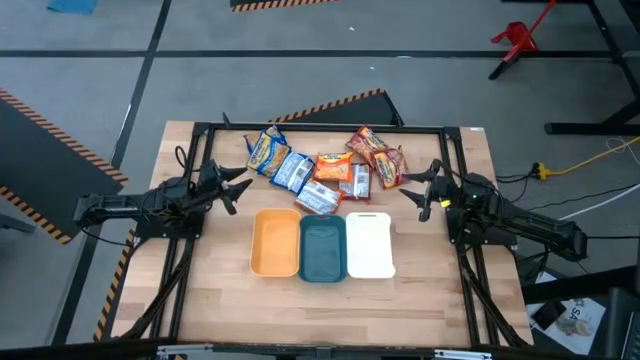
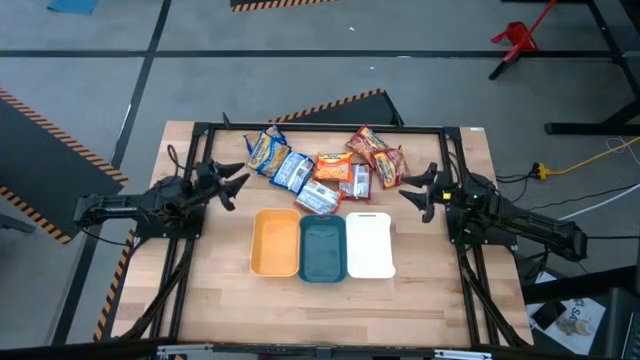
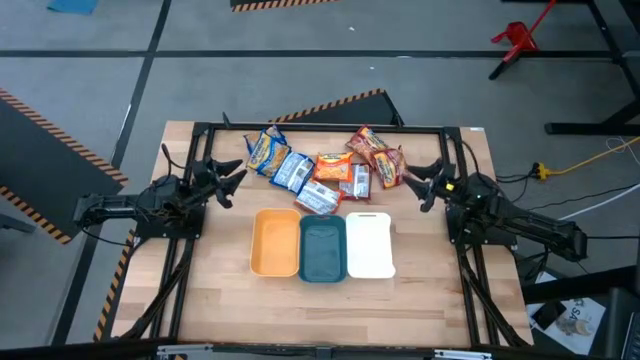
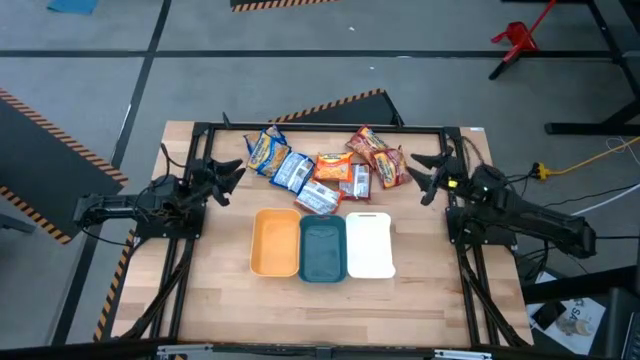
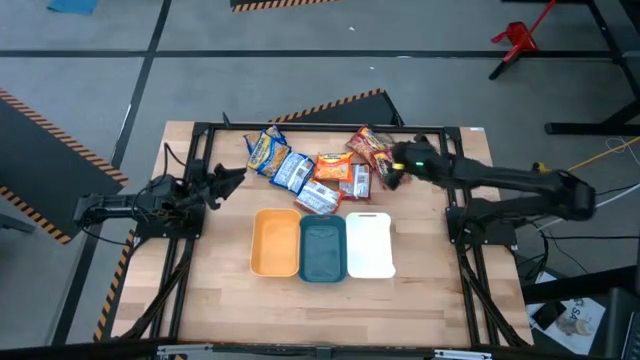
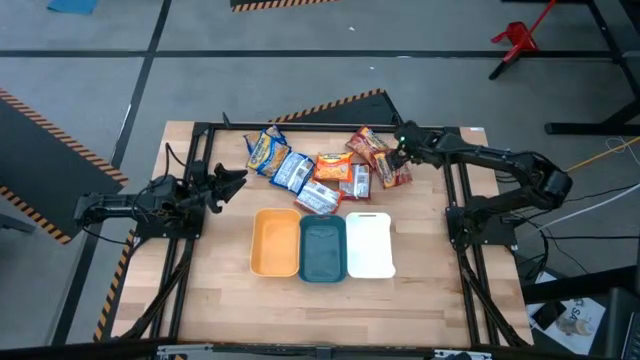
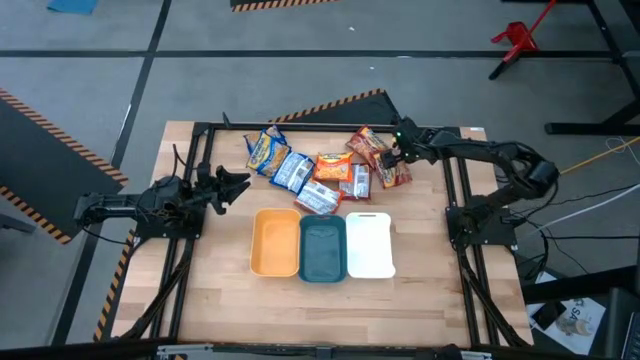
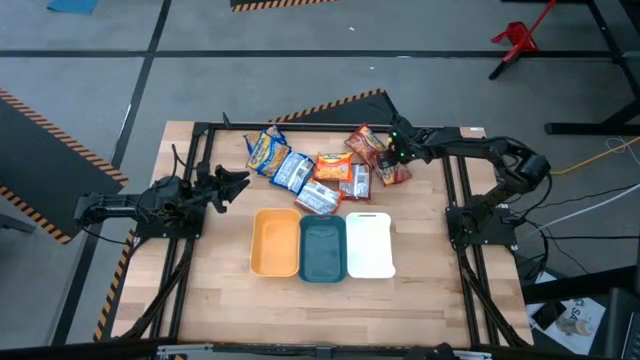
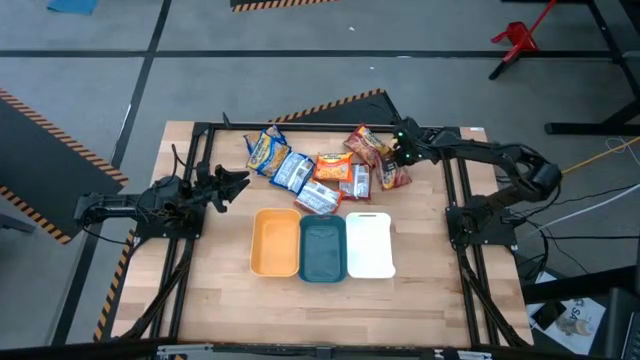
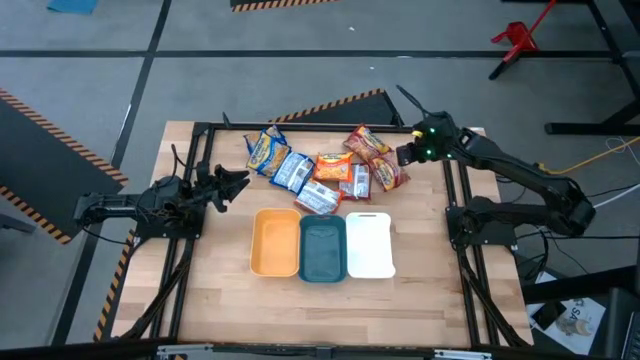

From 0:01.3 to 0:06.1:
Task: Sort Maruchan noodles
Put the center red noodle pack into the white bin

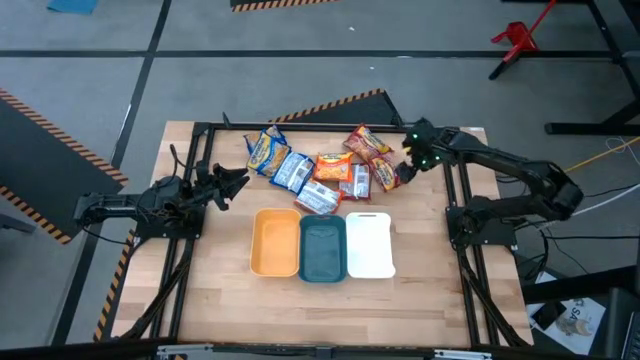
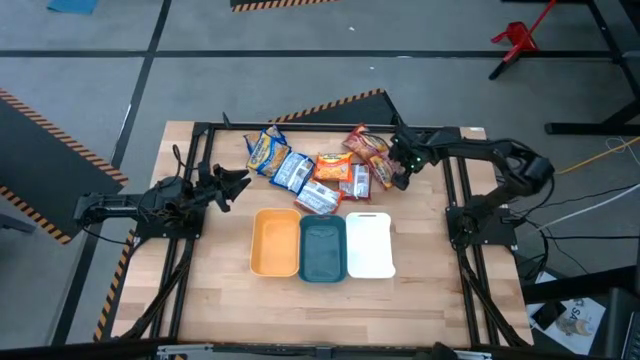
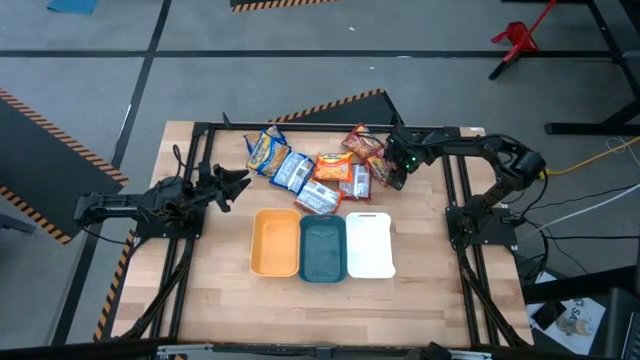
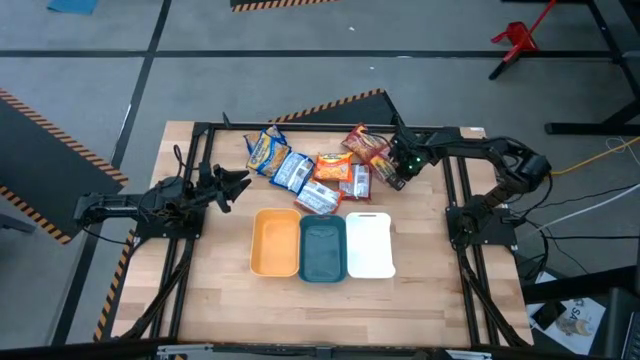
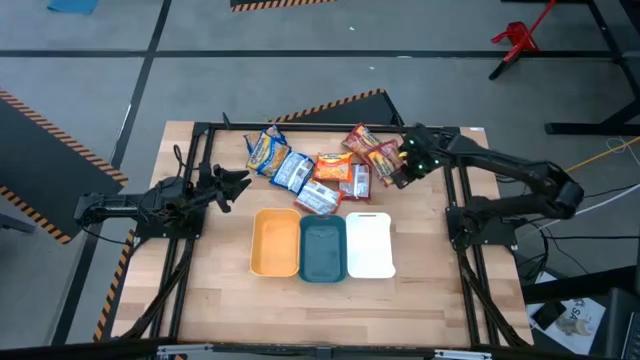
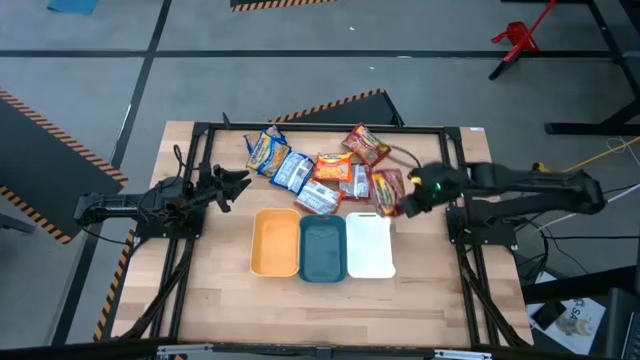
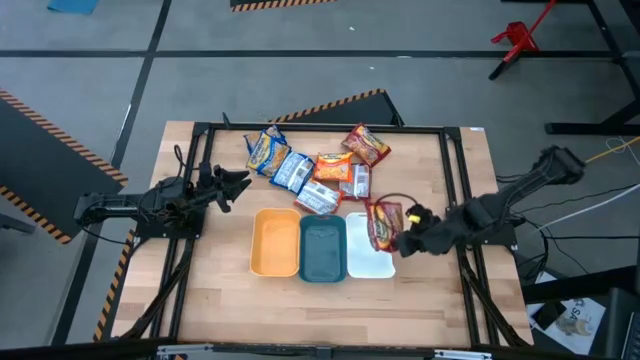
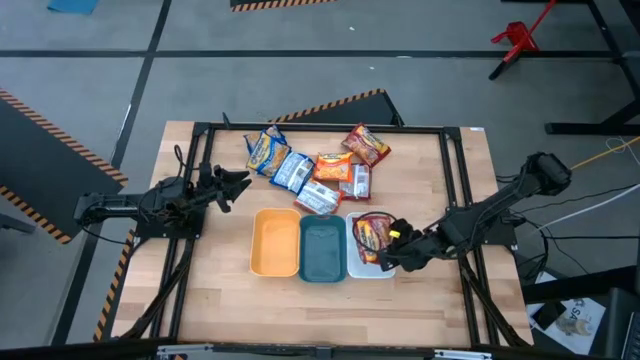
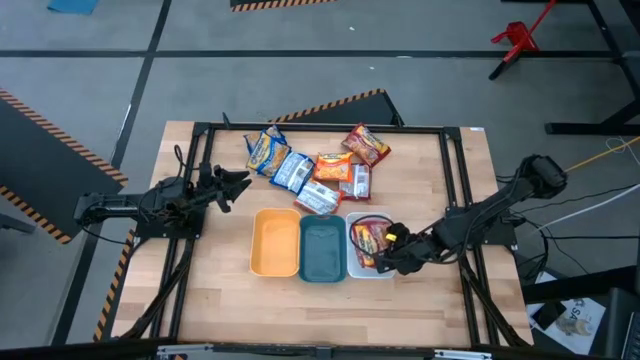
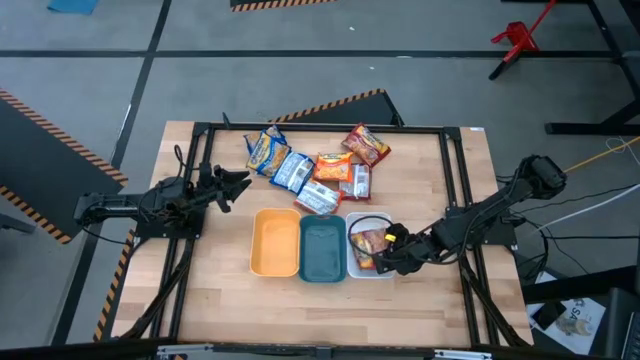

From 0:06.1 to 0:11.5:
Put the center red noodle pack into the white bin

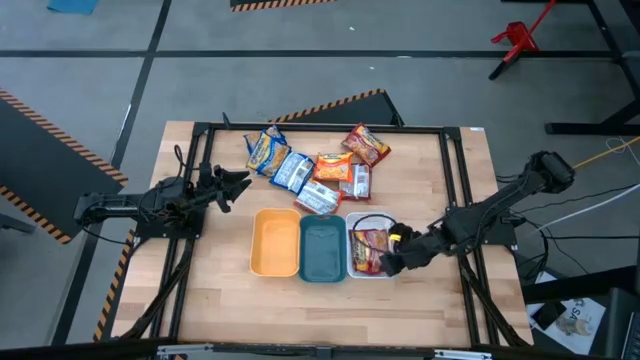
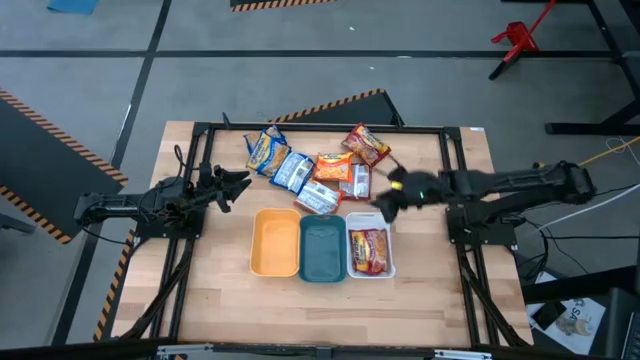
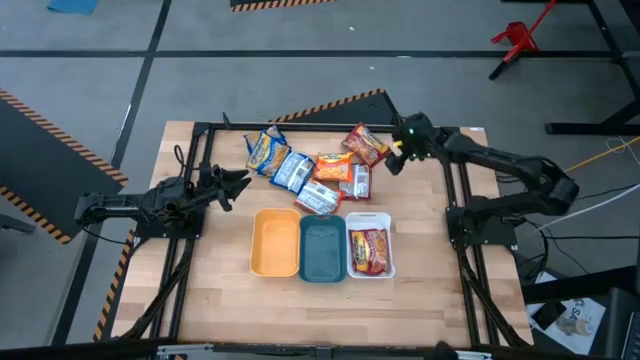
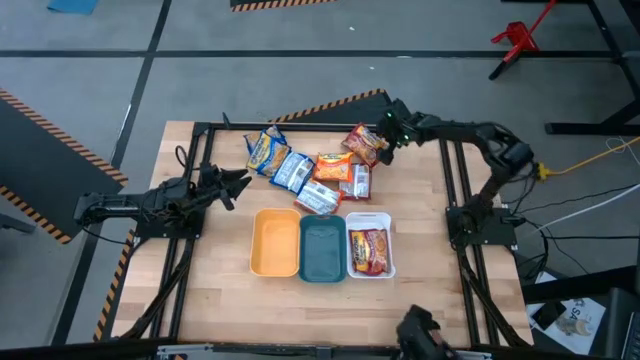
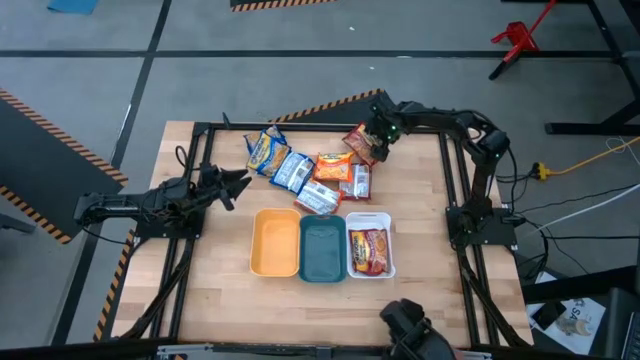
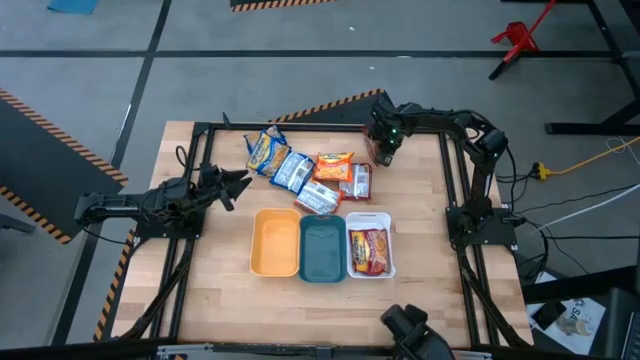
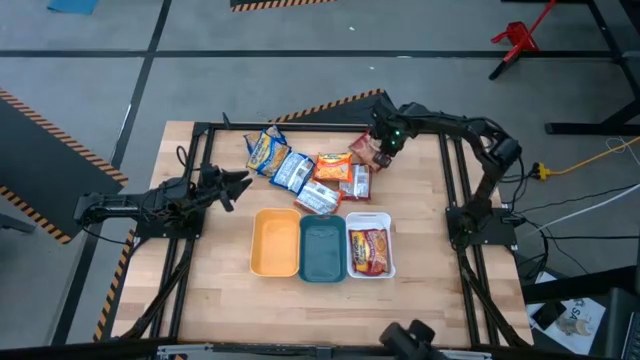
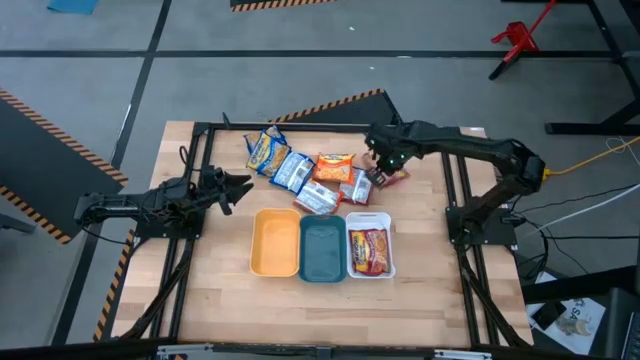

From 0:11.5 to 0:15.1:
Put the top red noodle pack into the white bin

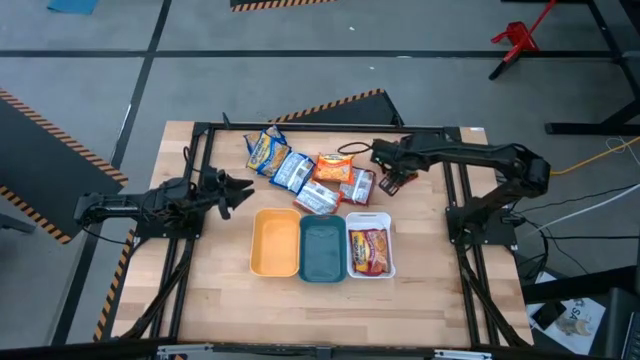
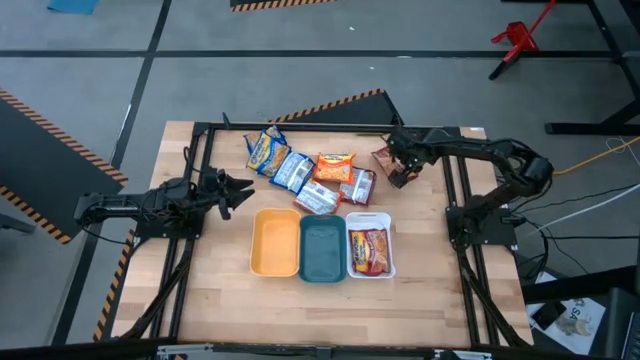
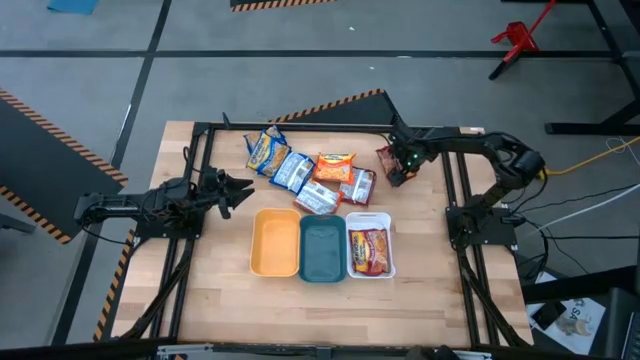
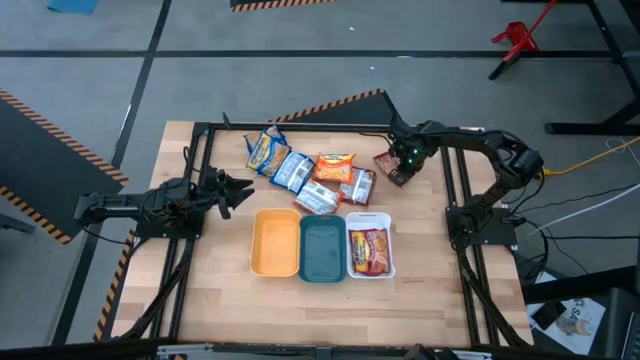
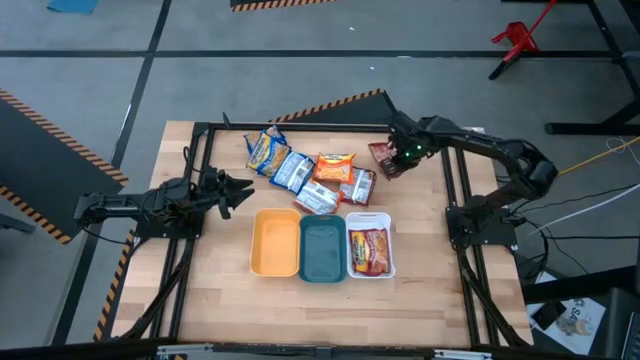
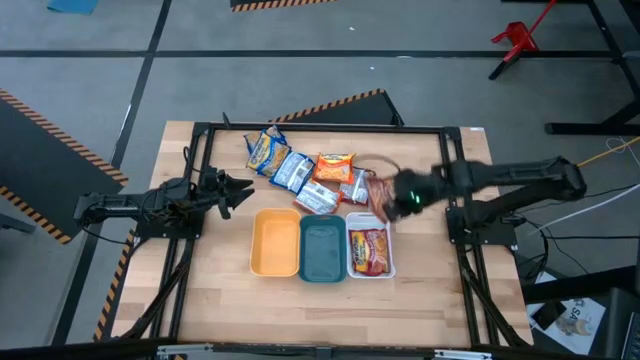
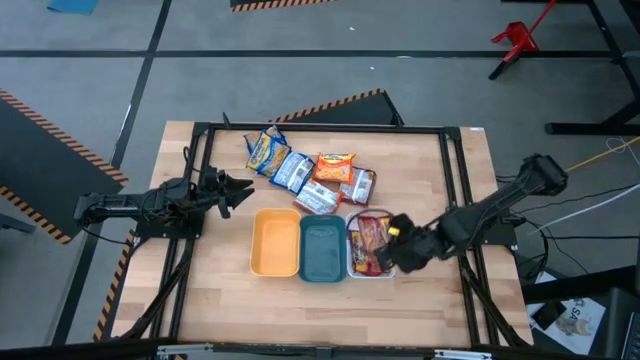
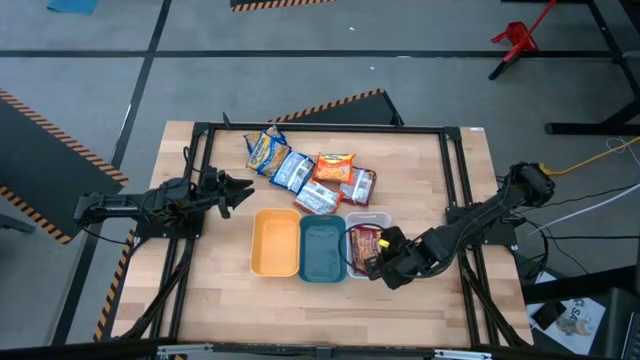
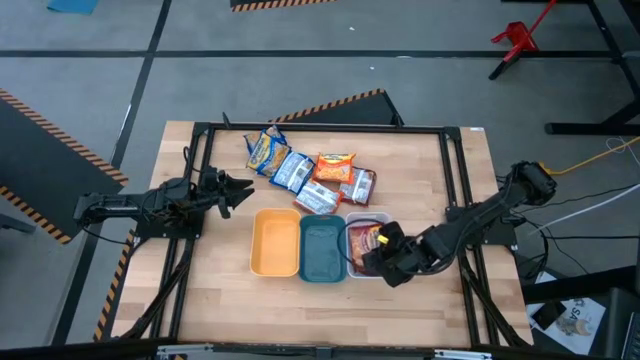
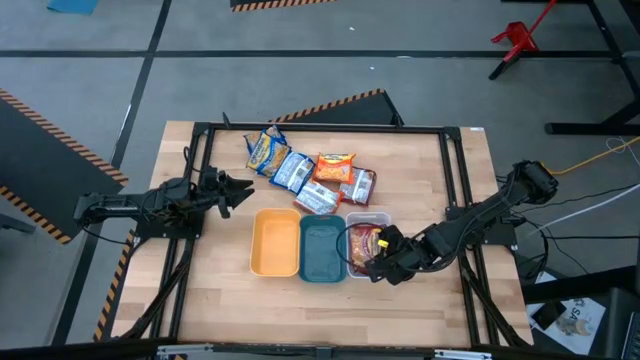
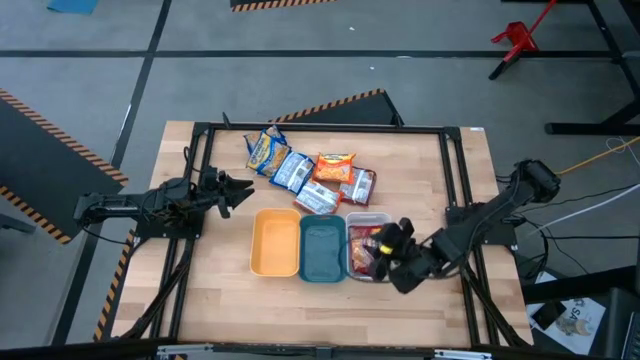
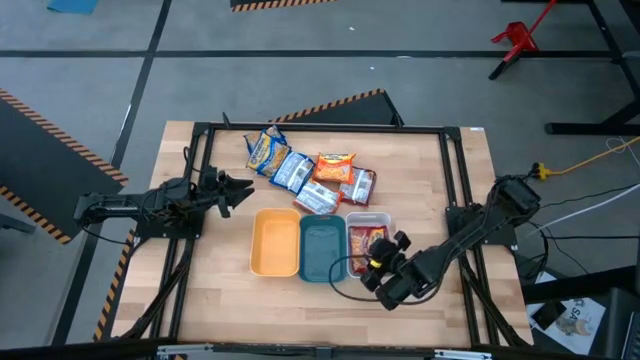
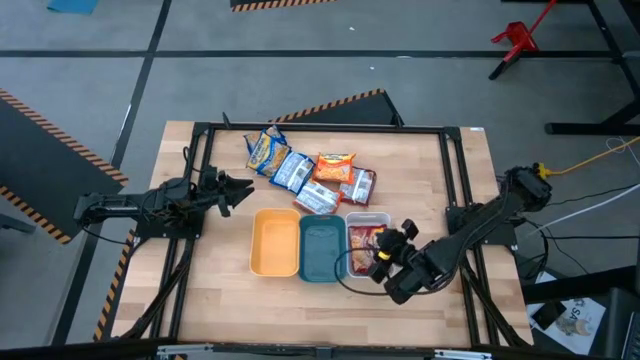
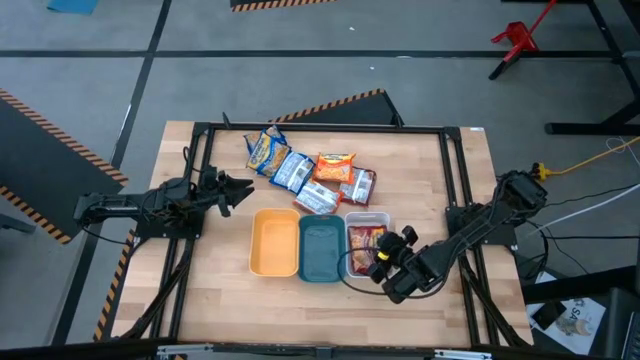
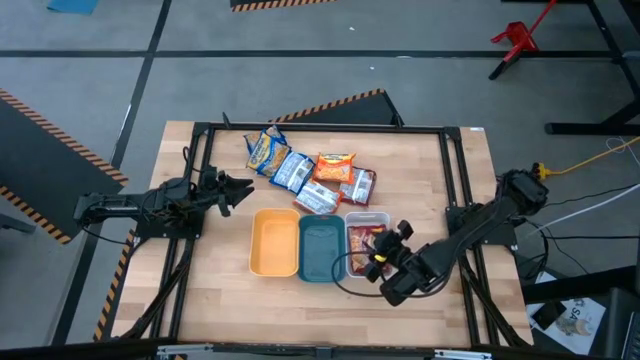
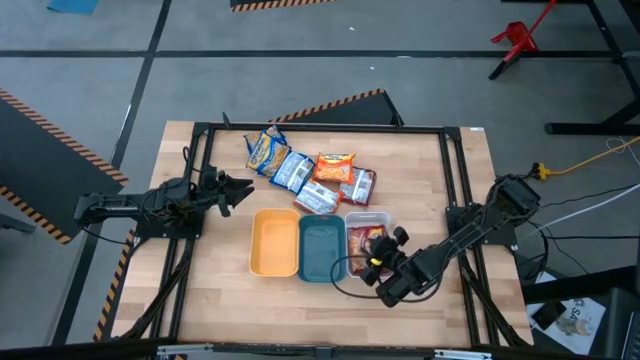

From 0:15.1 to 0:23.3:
Put the top red noodle pack into the white bin
